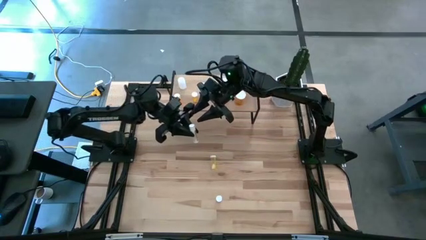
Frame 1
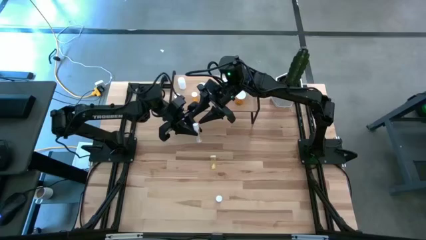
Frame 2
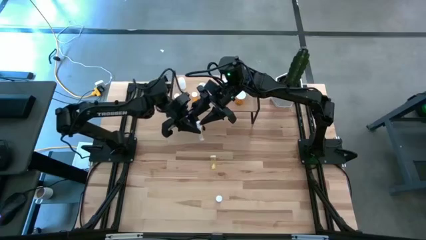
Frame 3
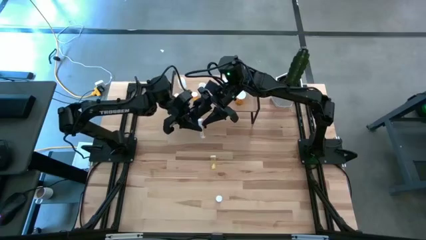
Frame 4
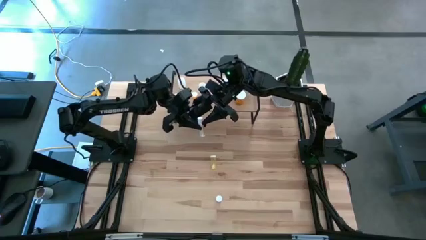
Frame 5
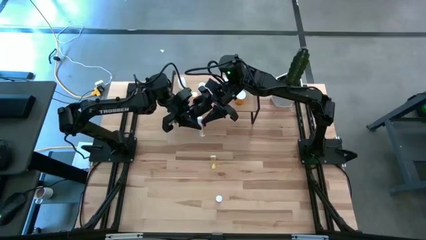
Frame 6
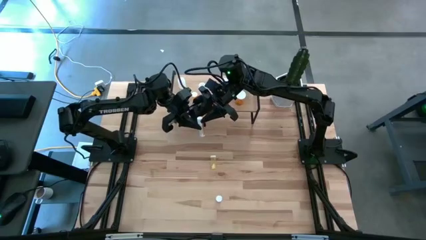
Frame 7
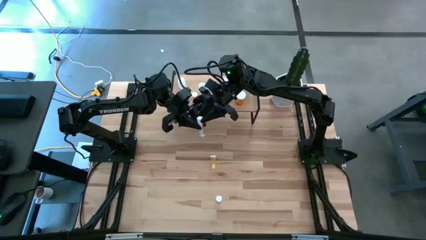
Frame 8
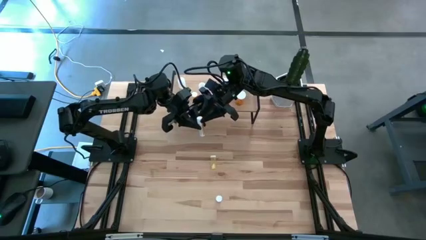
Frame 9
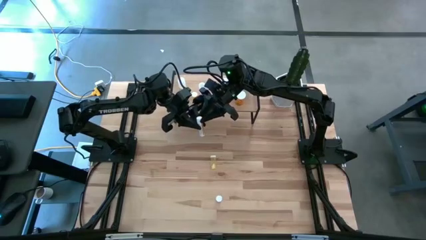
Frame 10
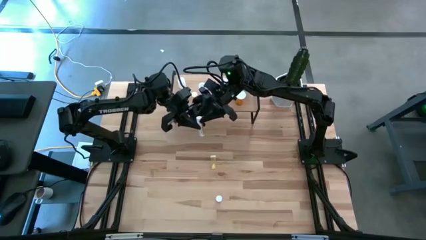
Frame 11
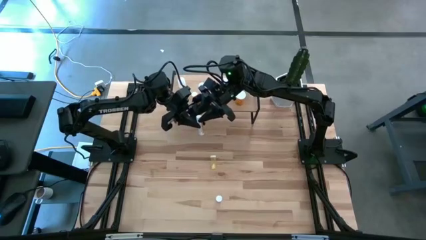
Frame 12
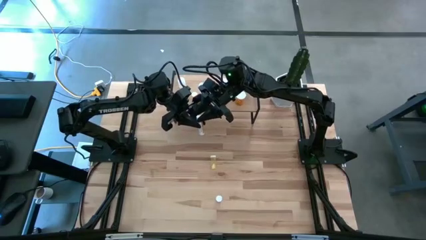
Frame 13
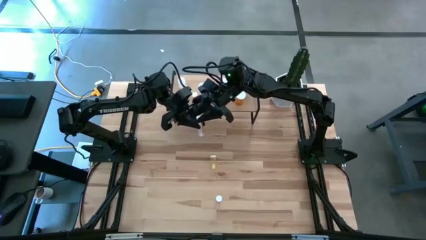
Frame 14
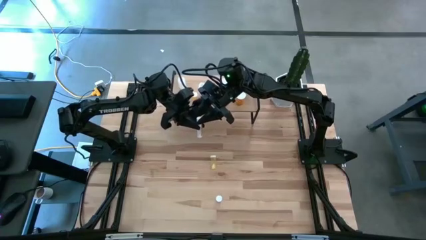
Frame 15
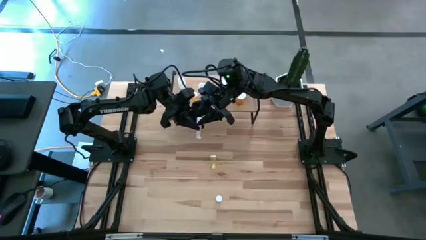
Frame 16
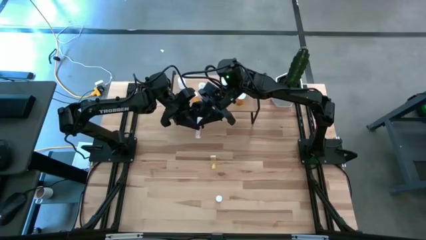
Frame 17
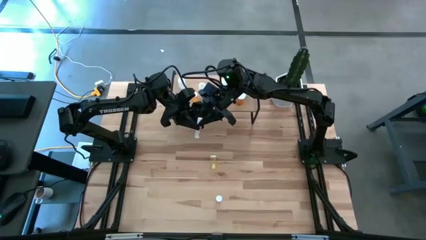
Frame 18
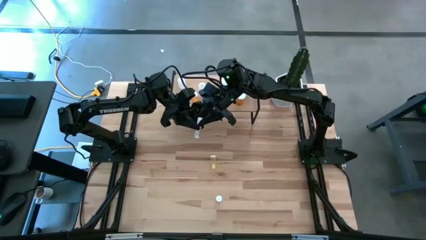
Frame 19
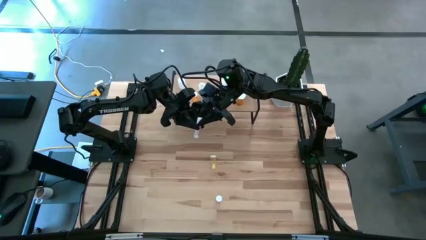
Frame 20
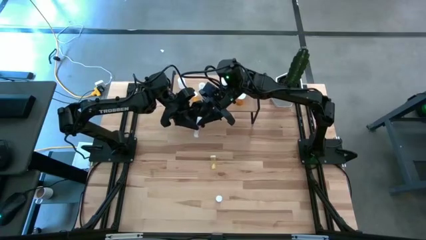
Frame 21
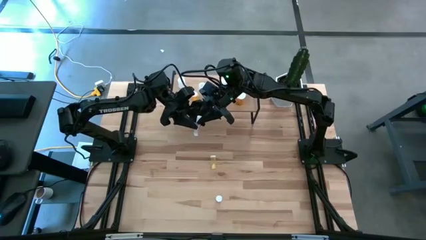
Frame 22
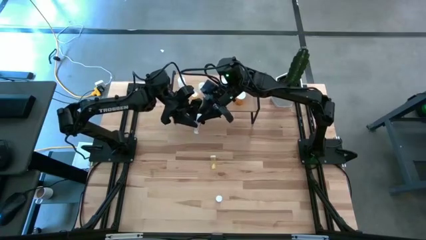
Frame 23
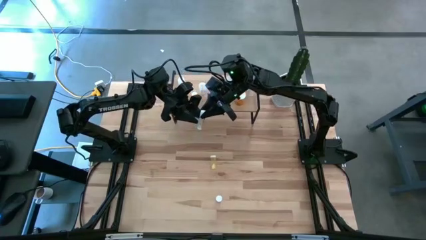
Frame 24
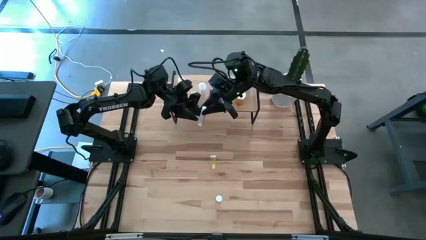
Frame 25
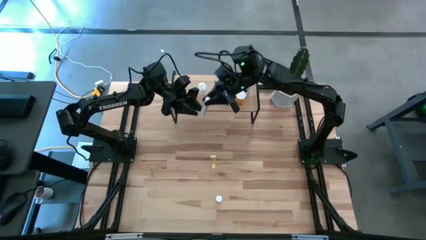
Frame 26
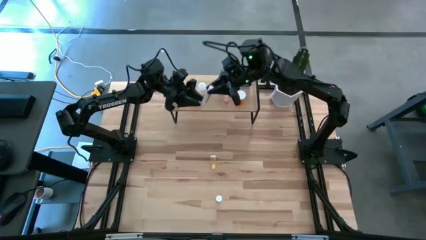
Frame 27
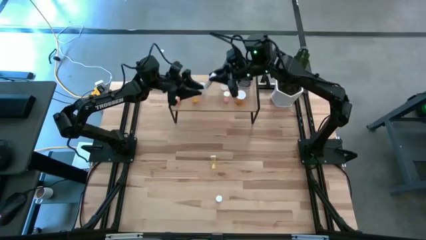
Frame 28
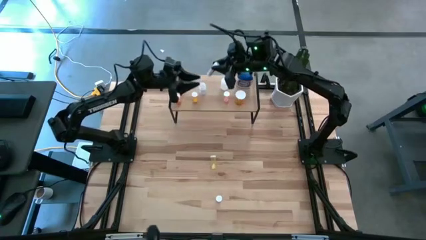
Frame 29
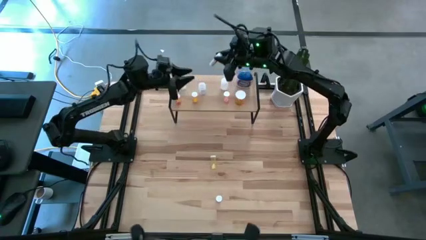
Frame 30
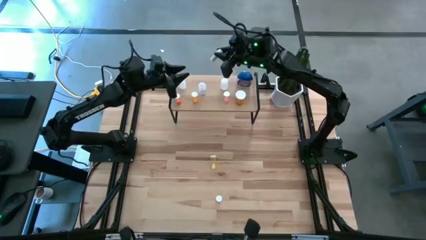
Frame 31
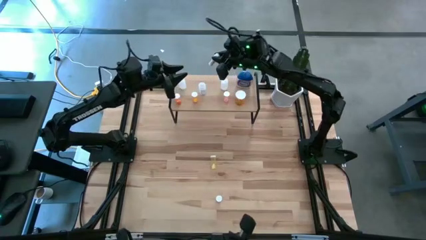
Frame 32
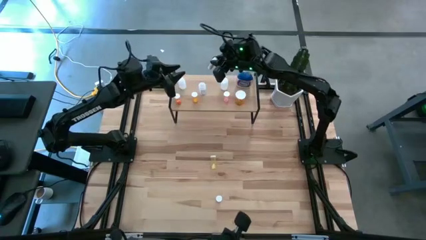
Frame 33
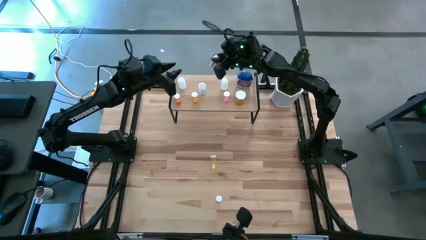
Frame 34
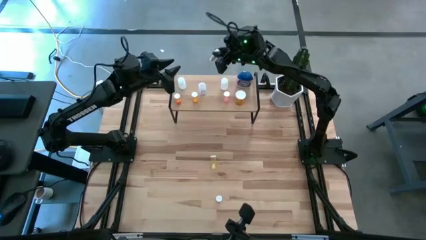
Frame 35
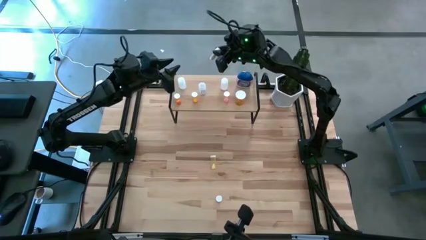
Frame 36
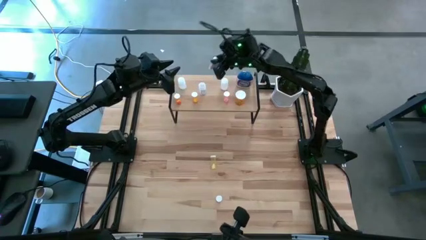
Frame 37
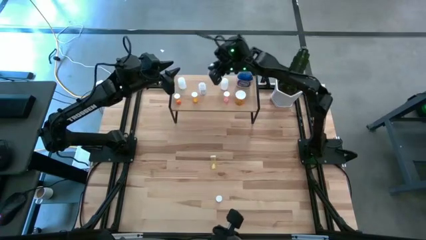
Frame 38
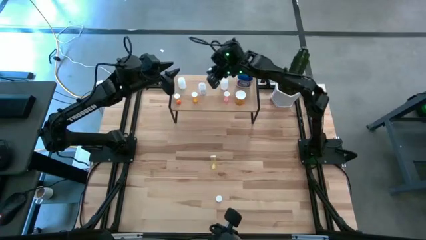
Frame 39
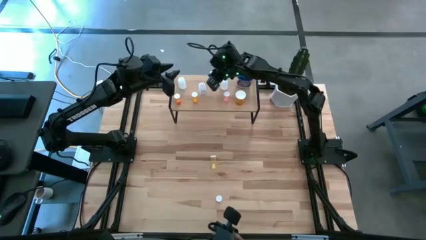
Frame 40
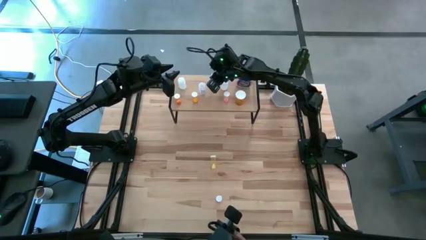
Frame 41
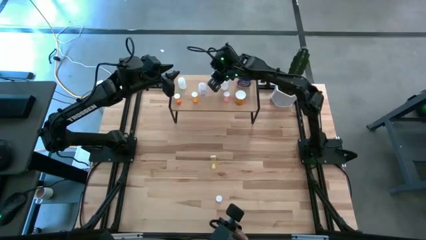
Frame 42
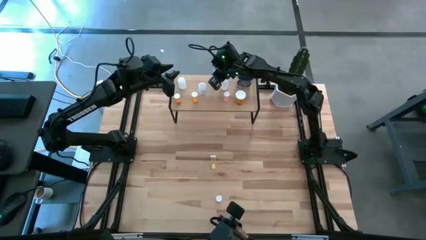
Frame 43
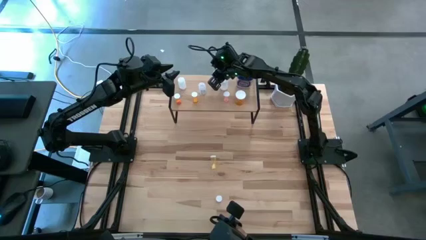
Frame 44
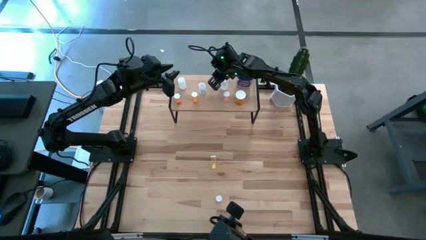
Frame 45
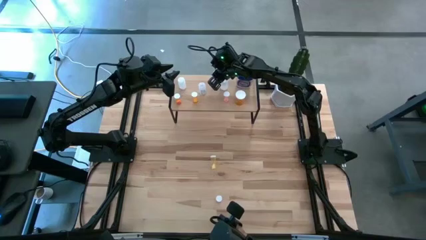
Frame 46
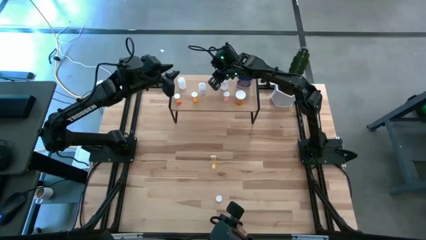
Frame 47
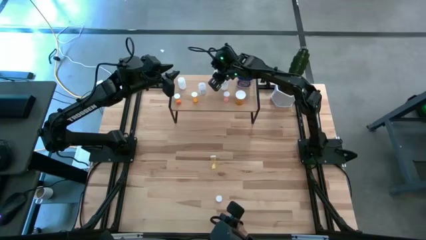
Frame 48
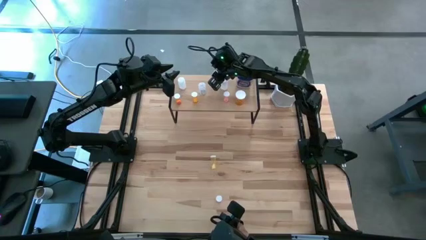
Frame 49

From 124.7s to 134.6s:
Task: Pick and place medicine bottles onto shelf by color
Put the white pill bottle on the shelf

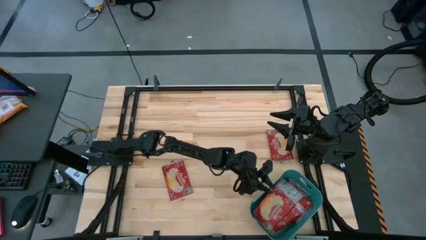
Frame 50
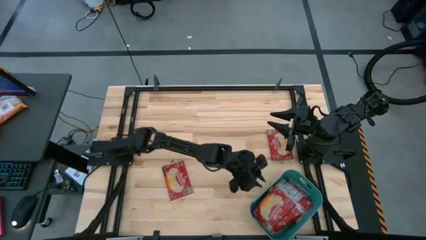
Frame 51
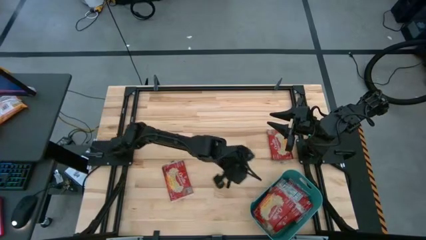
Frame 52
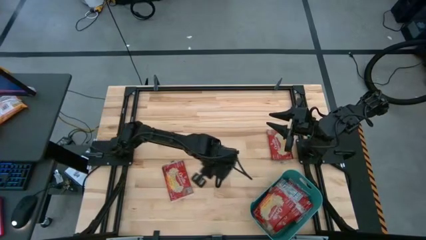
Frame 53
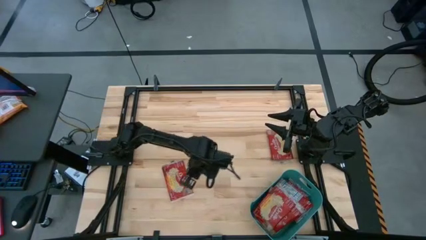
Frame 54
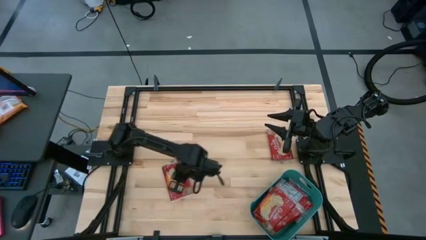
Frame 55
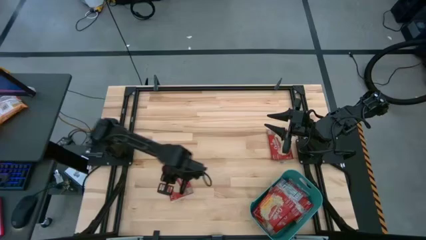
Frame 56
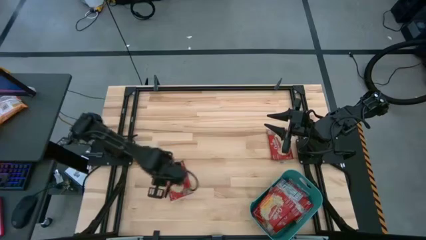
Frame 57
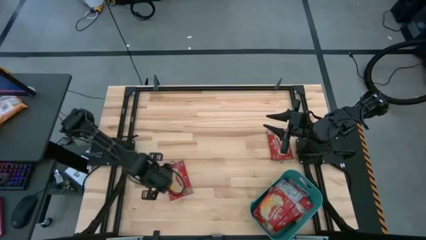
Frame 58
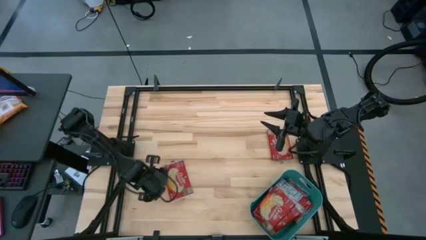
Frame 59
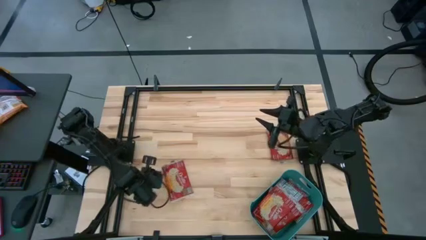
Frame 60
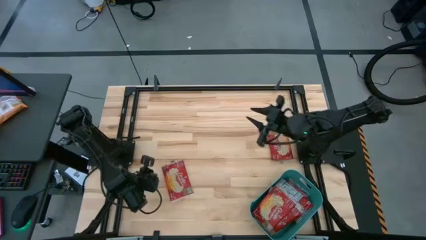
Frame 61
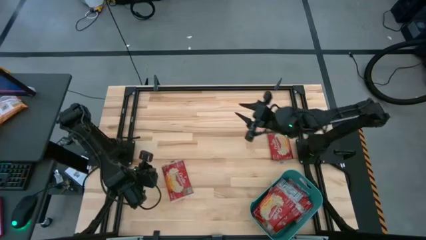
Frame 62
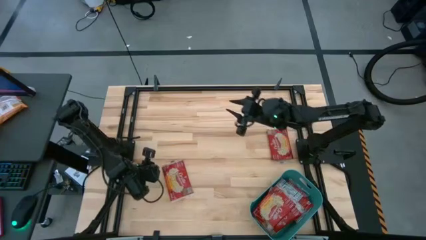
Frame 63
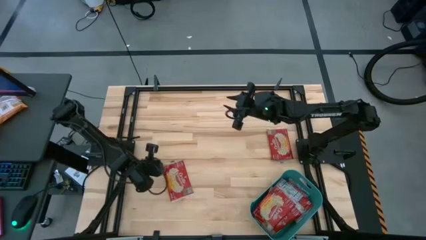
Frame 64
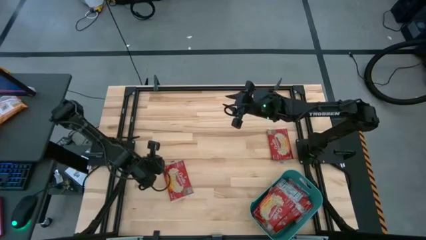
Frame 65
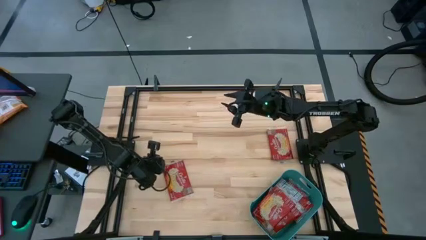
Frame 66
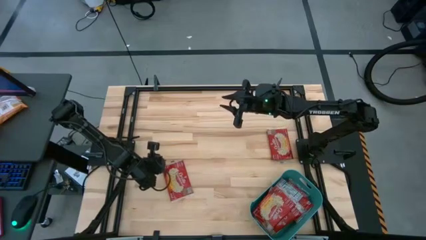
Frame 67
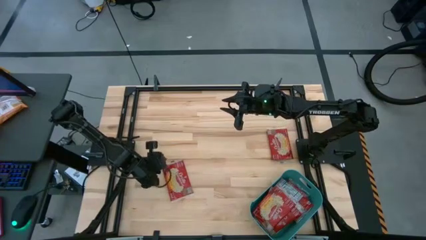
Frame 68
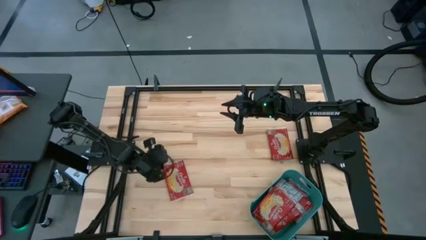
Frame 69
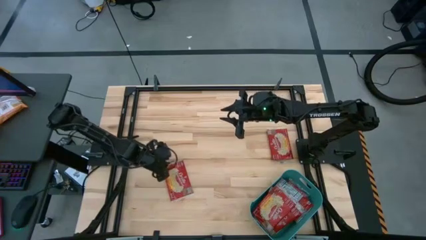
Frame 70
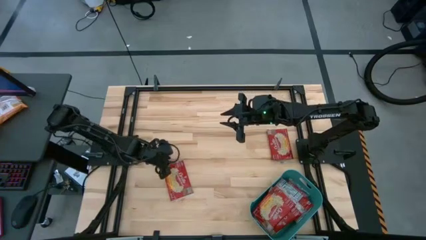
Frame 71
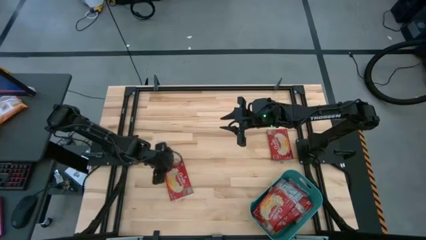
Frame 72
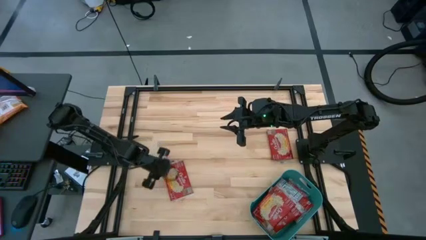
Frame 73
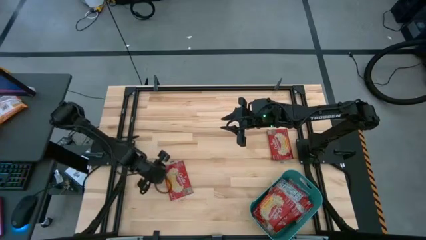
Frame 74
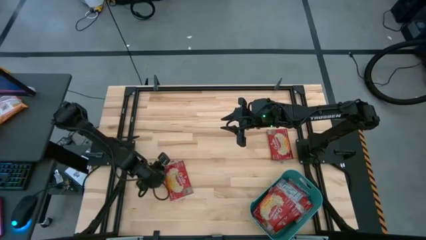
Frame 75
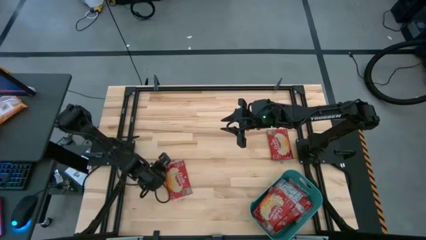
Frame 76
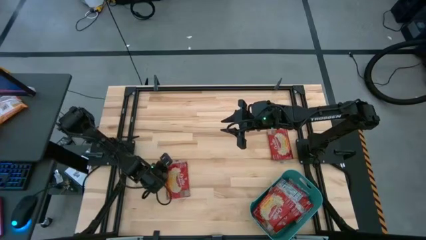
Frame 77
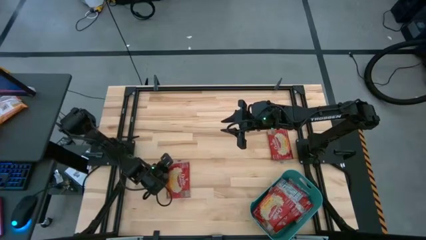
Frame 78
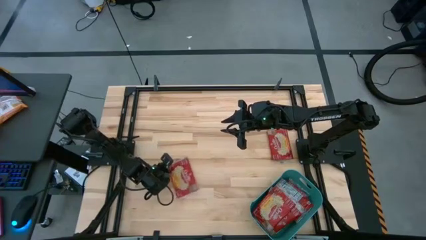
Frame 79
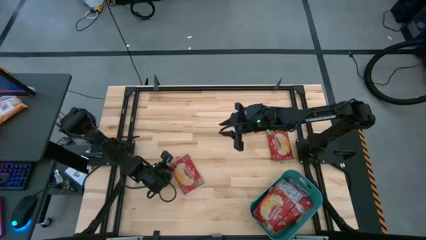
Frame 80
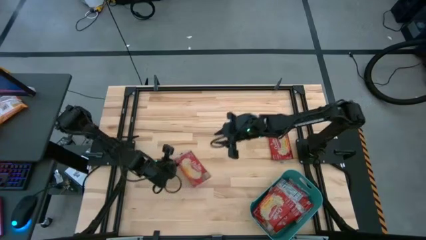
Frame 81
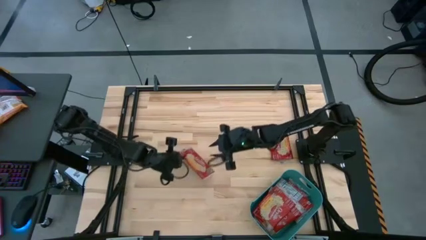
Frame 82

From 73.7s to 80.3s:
Task: Sort popcorn bags into baskets
Put the red popcorn into the green bin
